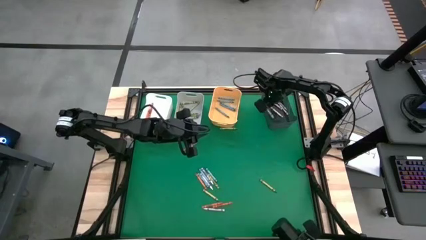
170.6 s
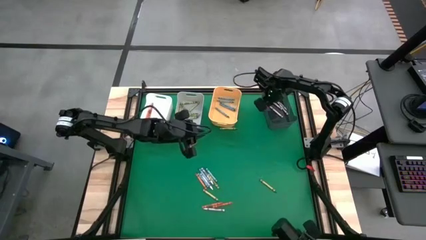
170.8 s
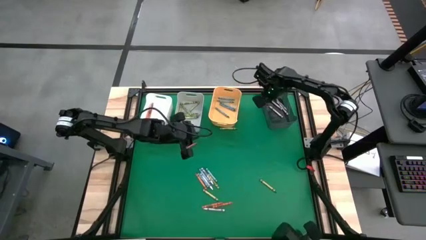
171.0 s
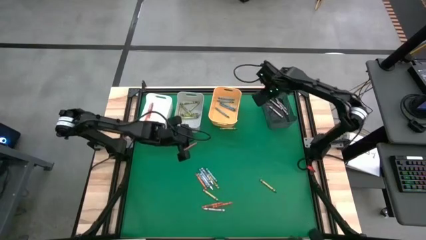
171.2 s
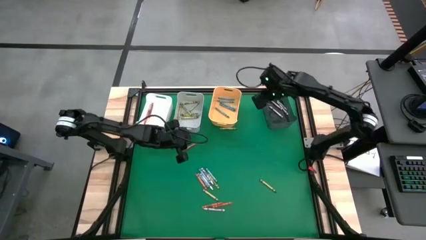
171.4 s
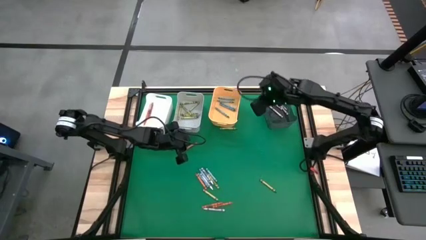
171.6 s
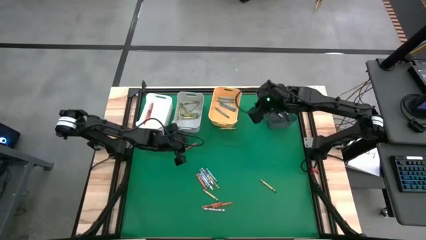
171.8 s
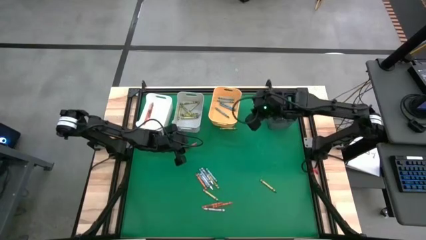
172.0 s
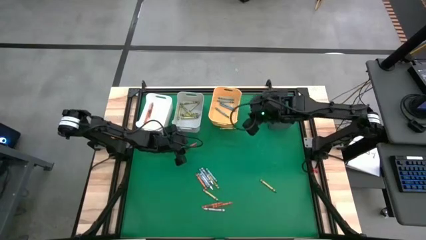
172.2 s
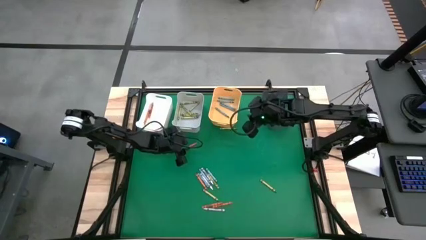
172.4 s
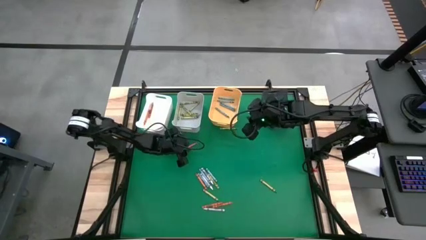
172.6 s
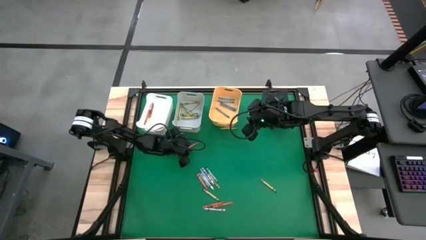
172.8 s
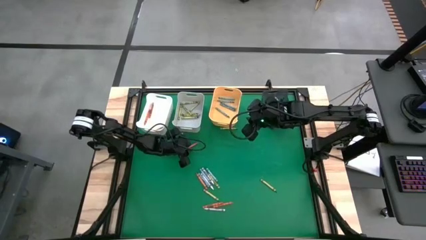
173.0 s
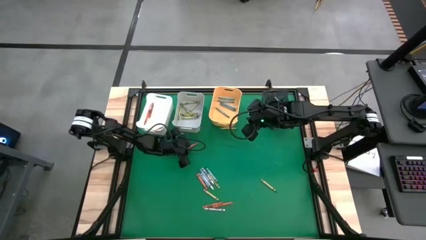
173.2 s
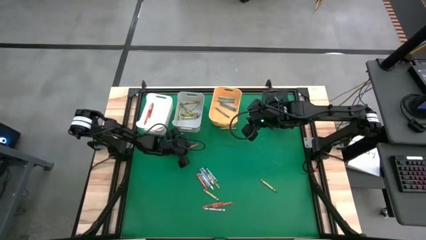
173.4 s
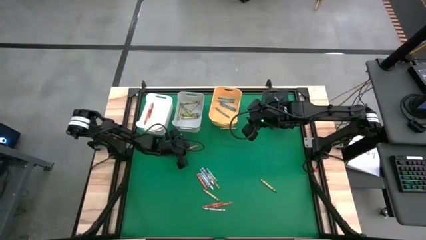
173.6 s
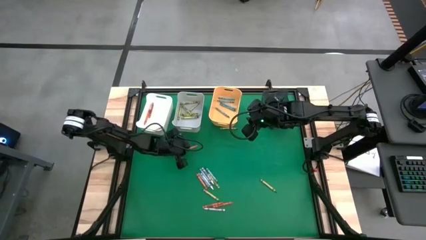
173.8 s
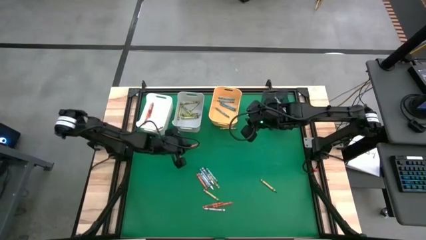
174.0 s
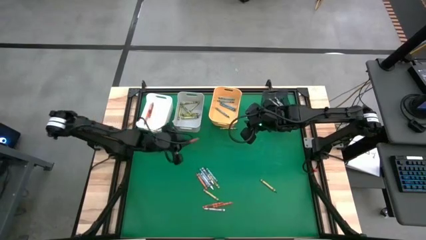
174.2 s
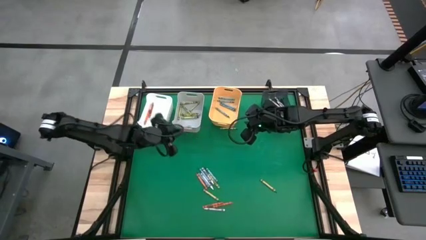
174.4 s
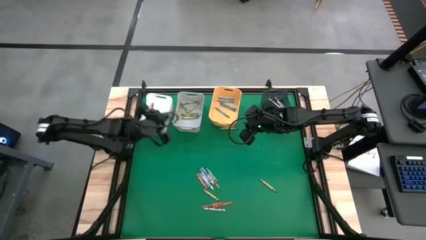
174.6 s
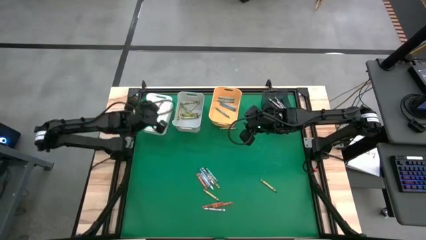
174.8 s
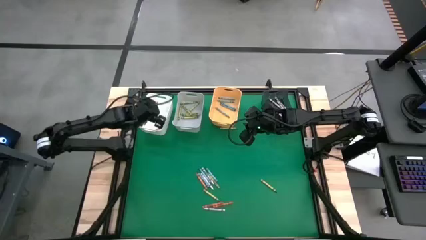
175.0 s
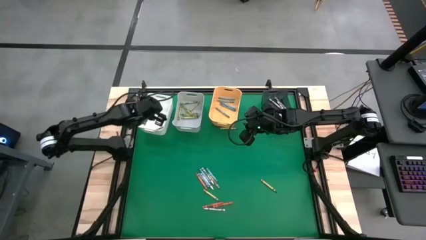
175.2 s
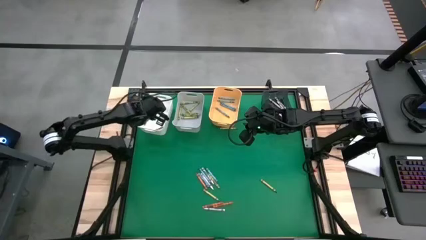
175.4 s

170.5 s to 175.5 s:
Task: Sort crayons
Put the orange crayon into the white bin

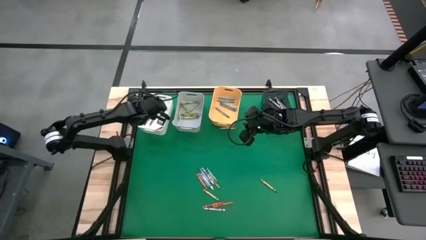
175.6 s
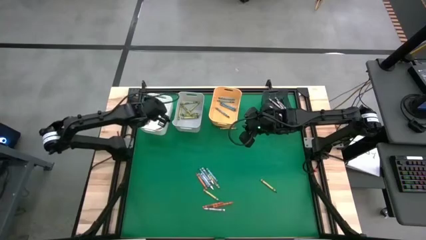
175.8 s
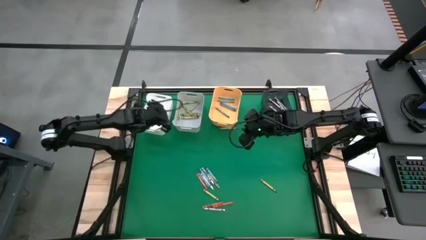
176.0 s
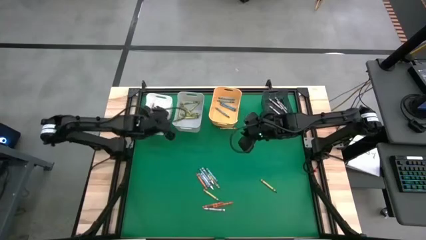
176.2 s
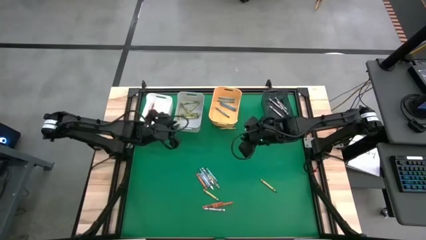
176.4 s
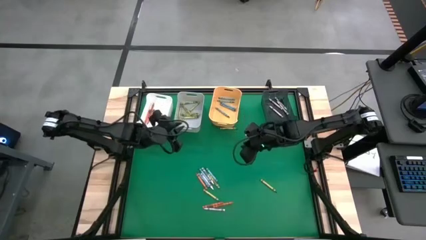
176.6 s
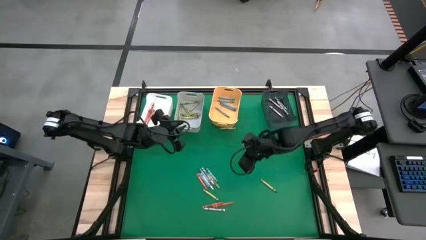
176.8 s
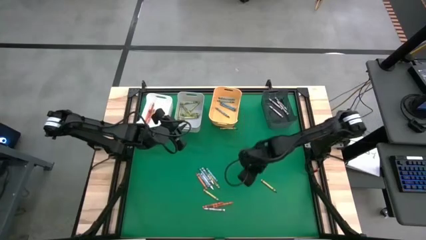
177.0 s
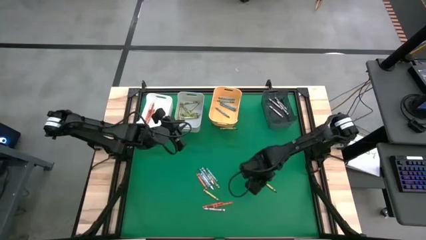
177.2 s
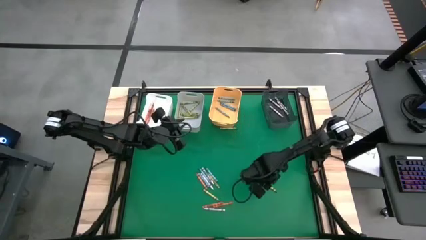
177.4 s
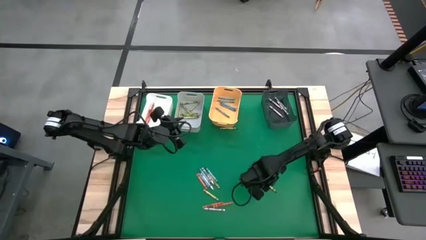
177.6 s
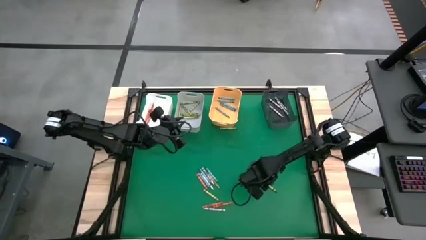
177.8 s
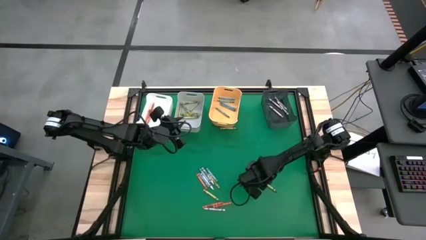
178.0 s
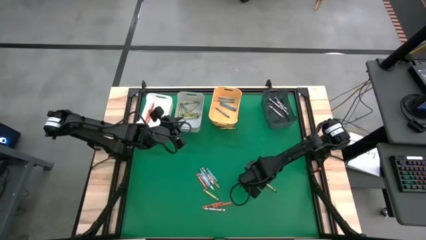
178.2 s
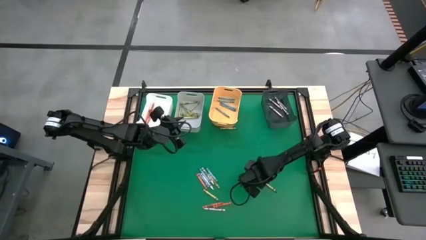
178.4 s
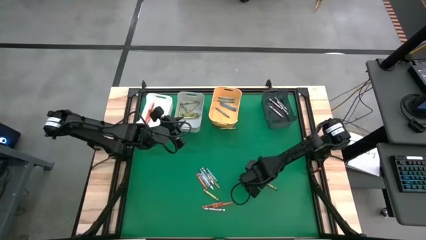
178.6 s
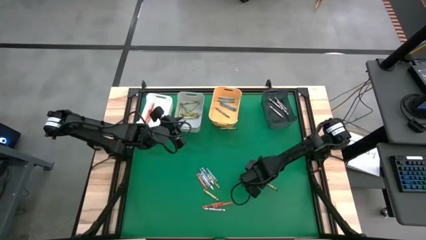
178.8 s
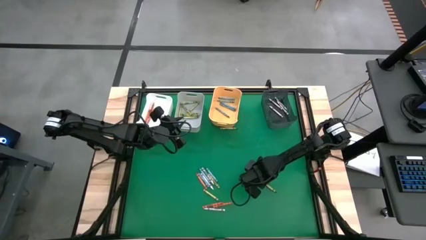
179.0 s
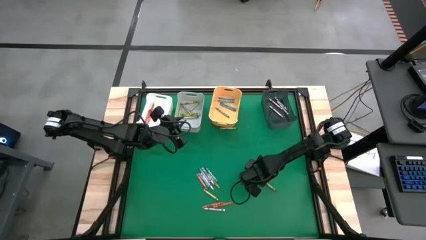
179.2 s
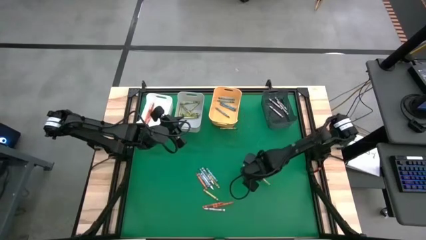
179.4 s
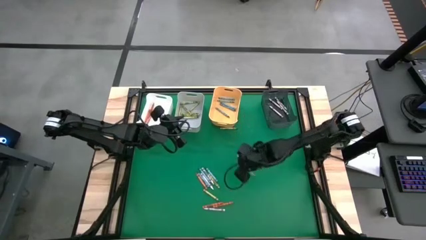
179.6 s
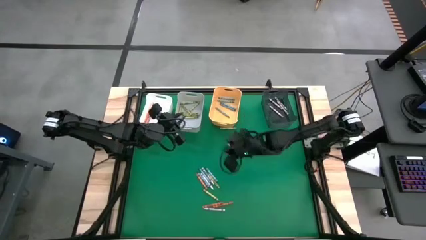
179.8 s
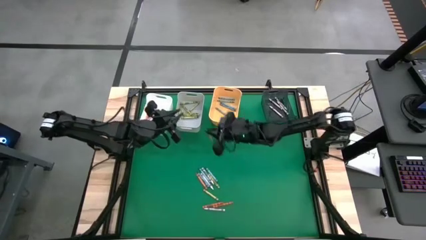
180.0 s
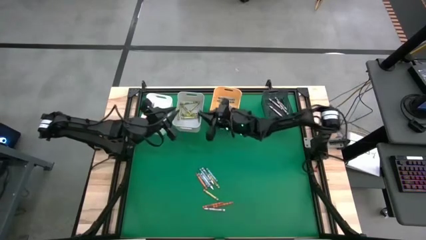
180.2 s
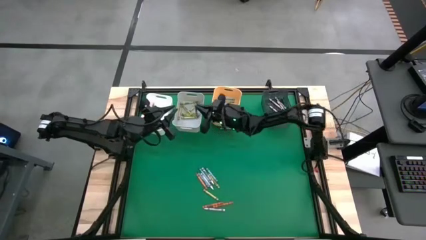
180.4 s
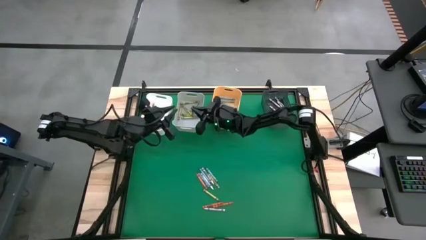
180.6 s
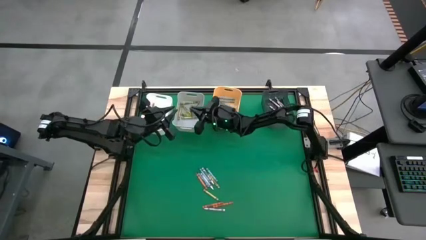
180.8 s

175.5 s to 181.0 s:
Put the green crayon into the gray bin

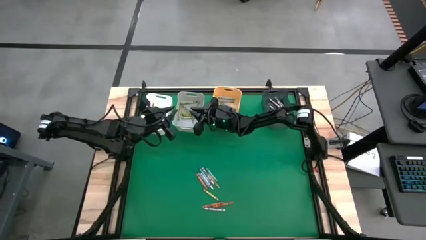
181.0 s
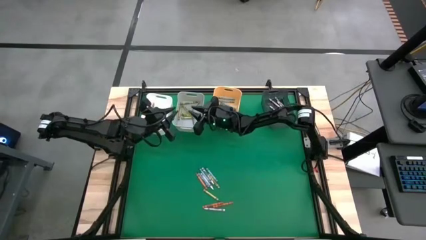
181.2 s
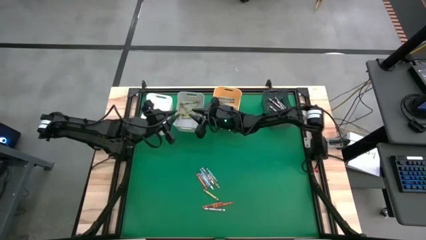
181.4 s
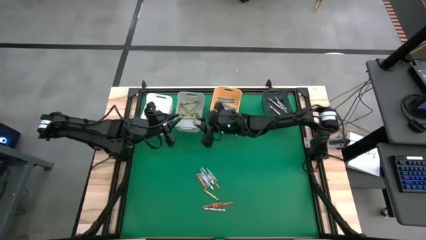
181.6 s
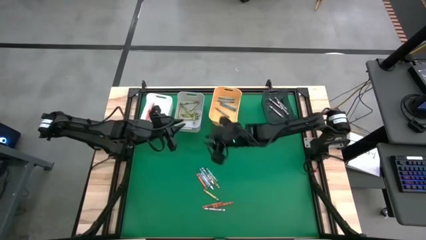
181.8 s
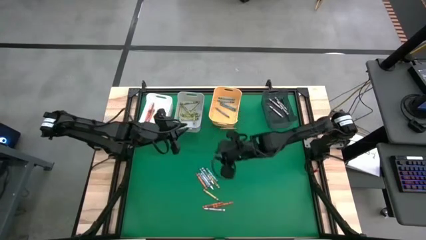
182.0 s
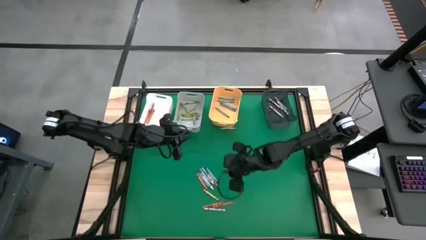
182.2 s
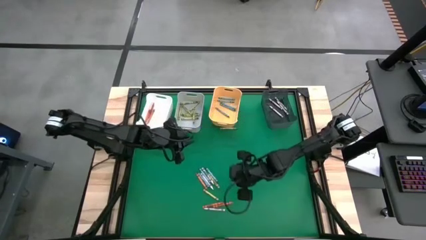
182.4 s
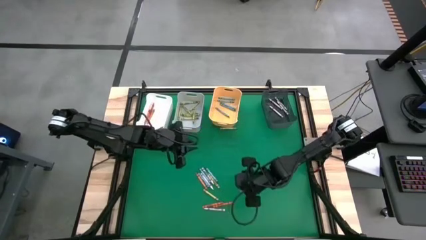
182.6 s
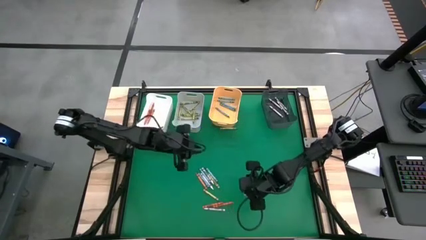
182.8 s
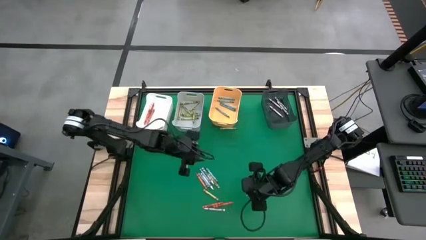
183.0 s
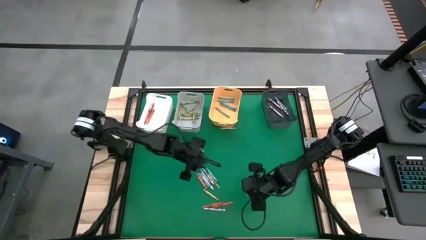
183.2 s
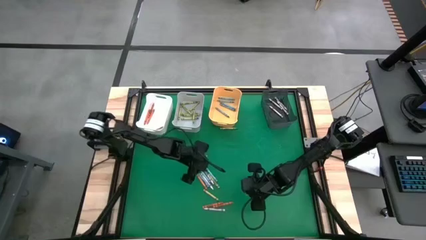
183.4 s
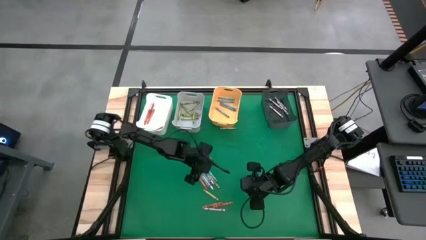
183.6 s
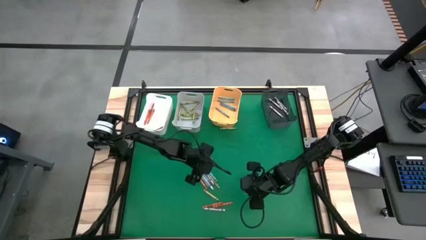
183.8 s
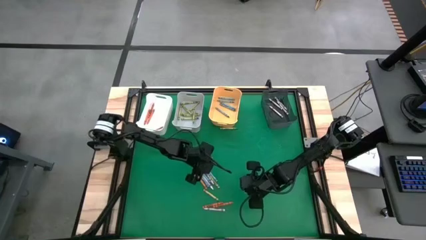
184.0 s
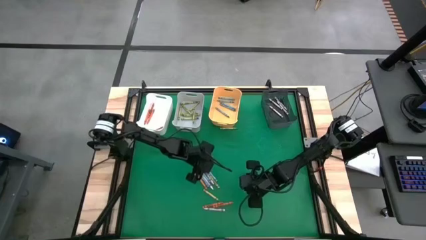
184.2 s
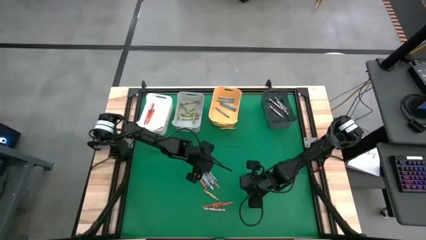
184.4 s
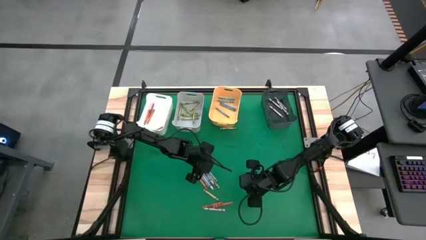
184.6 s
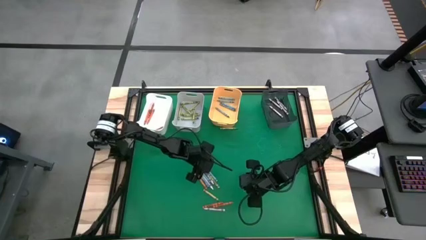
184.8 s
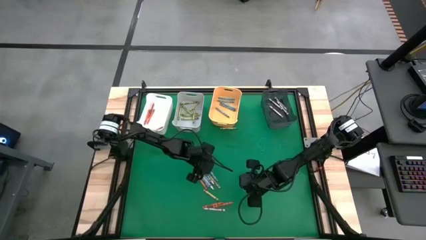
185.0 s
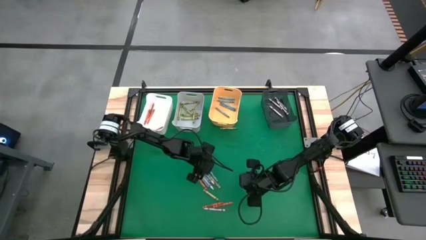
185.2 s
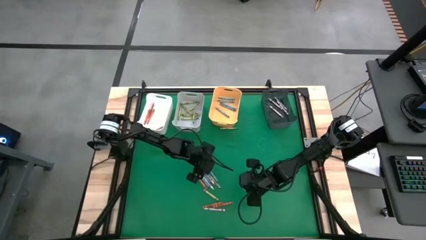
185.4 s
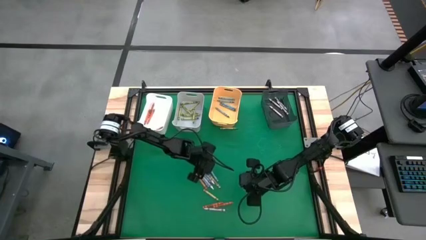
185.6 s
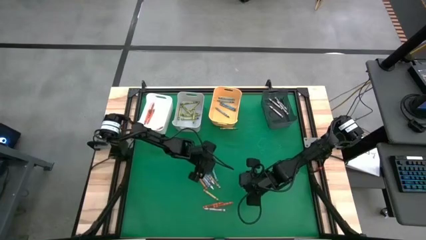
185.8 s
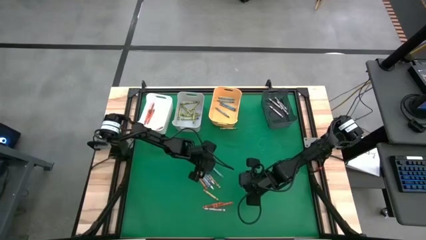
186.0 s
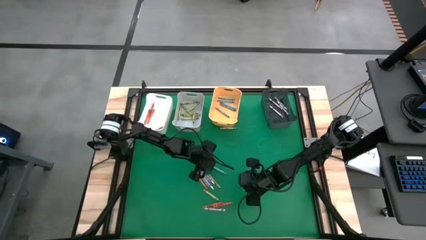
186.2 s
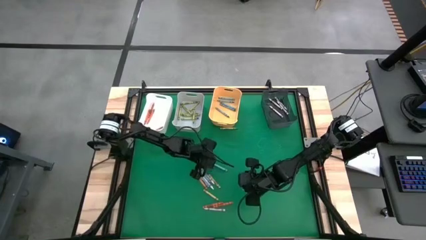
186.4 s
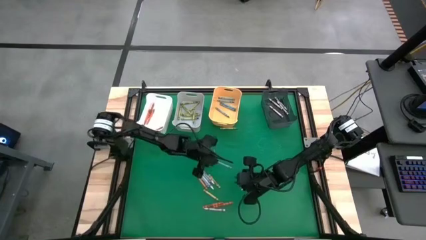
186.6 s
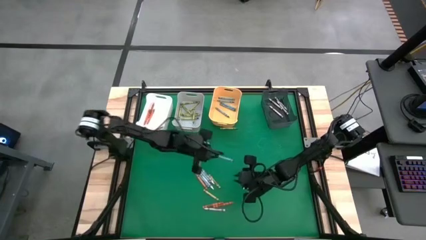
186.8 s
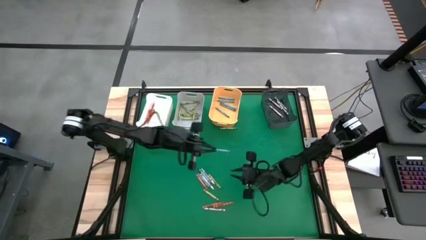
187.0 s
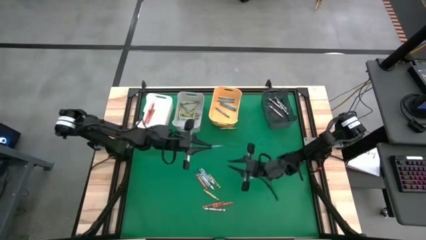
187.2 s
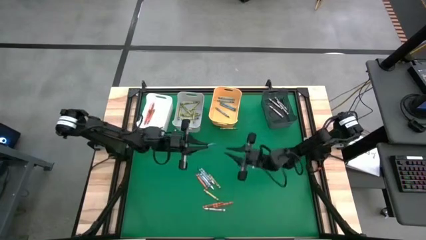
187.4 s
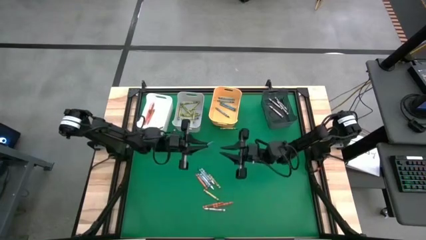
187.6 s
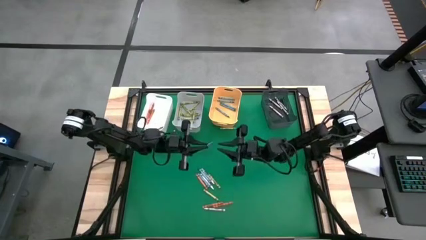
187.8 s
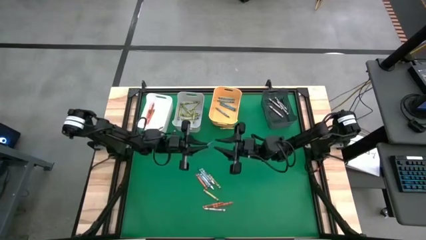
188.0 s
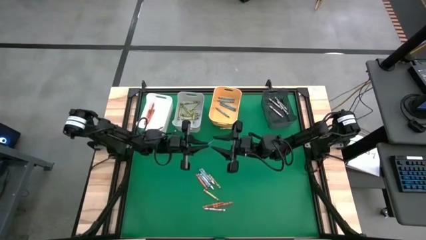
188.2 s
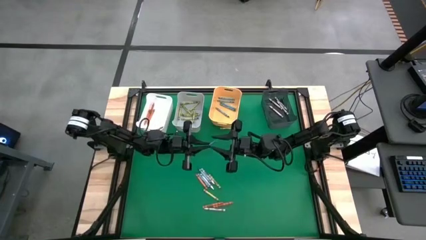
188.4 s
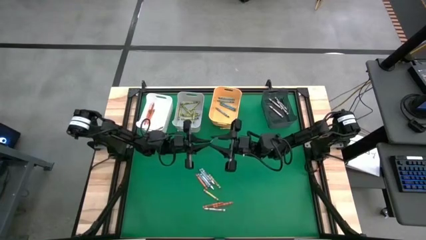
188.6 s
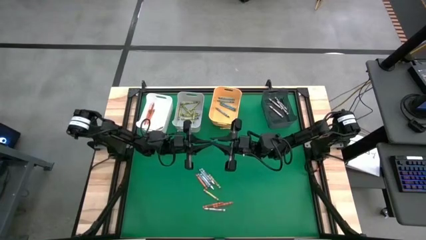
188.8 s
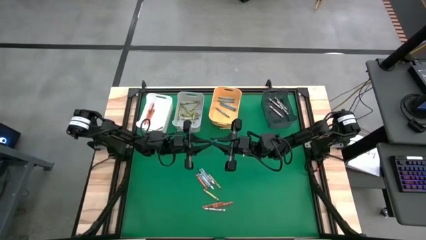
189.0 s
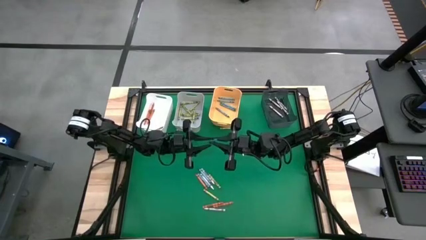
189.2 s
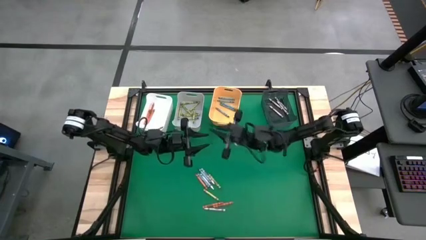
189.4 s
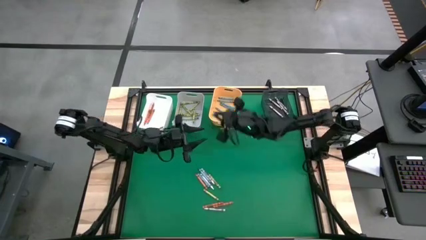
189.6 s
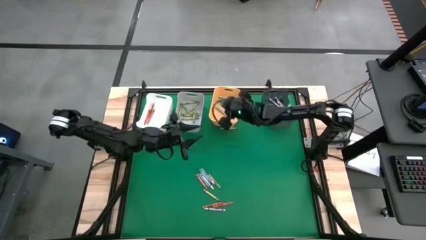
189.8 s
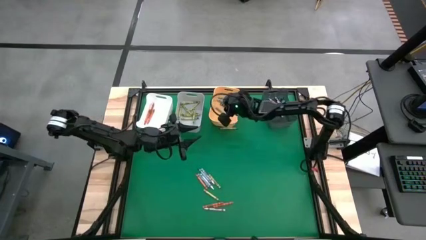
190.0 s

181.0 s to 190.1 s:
Put the blue crayon into the yellow bin
